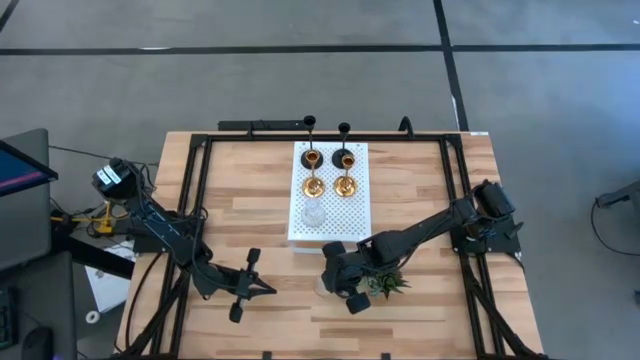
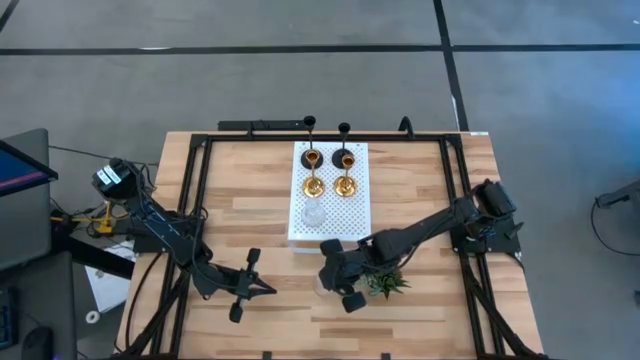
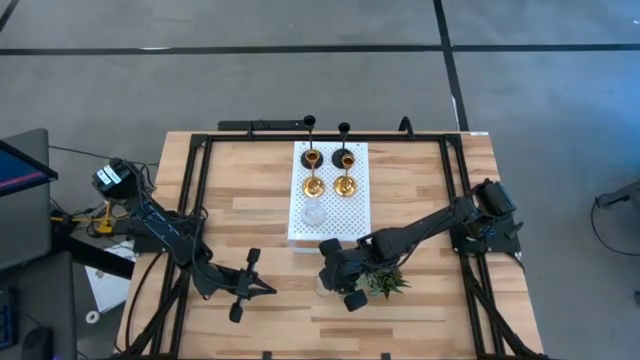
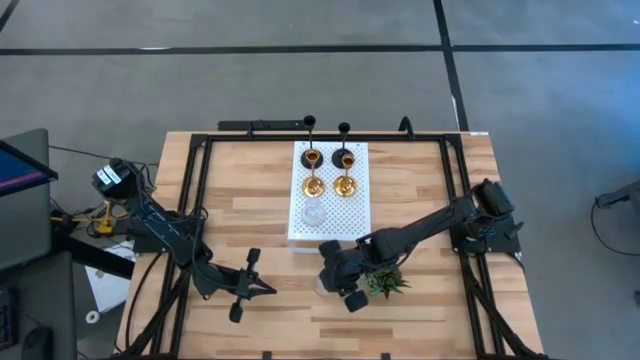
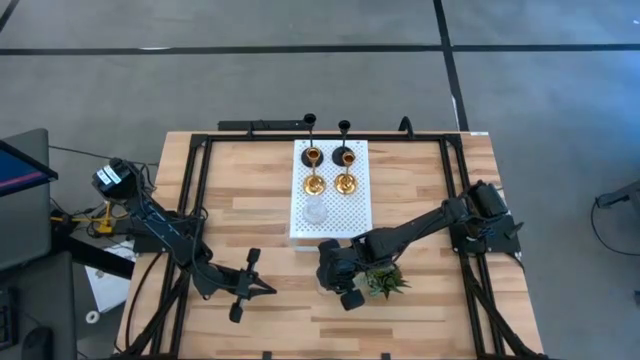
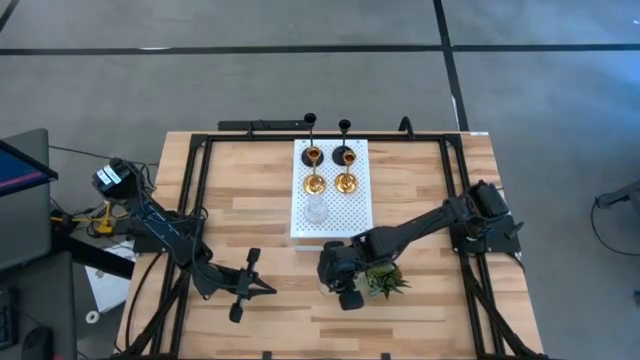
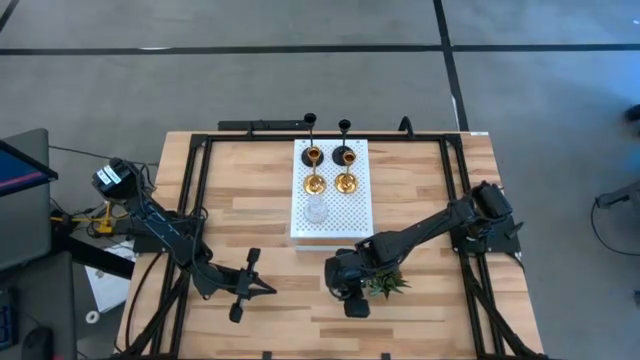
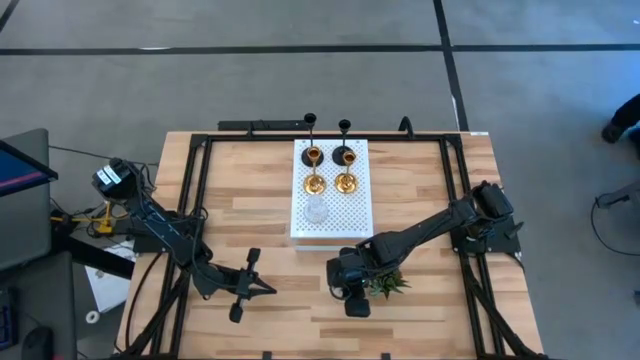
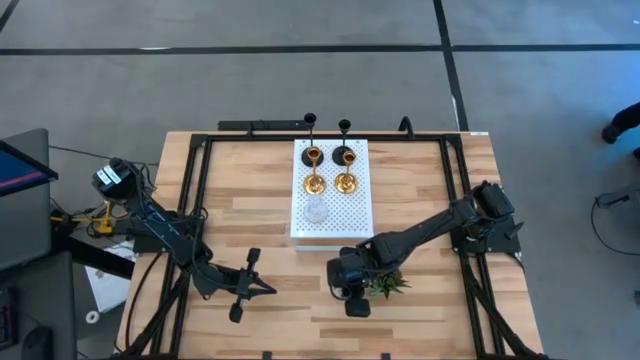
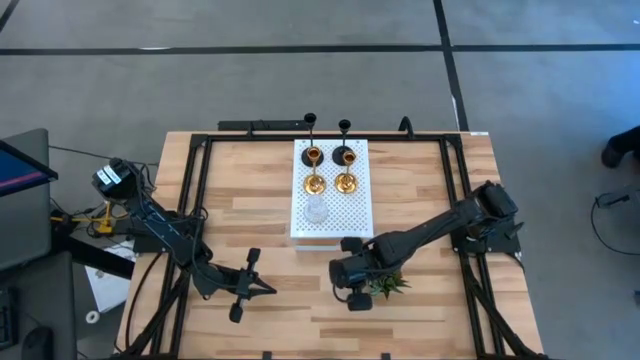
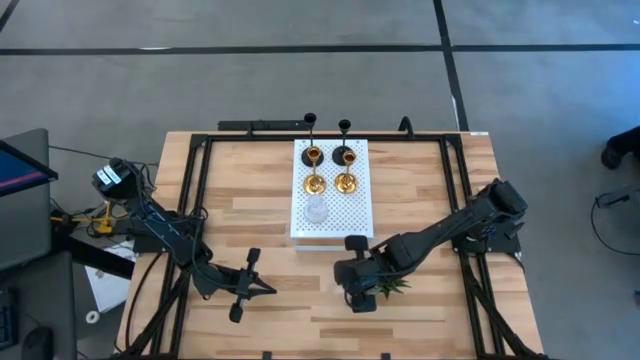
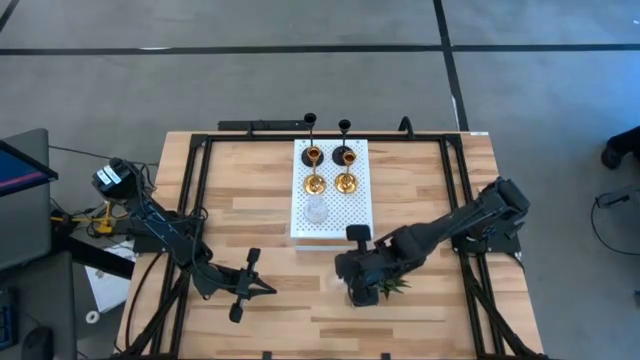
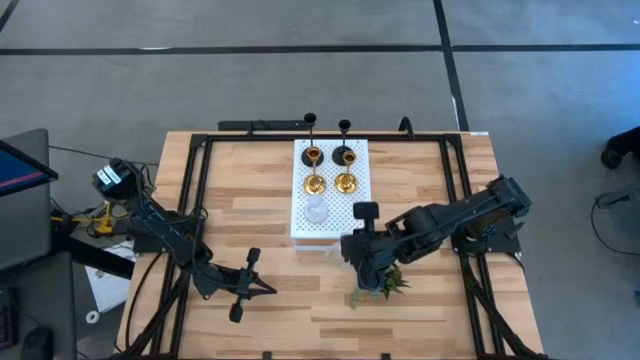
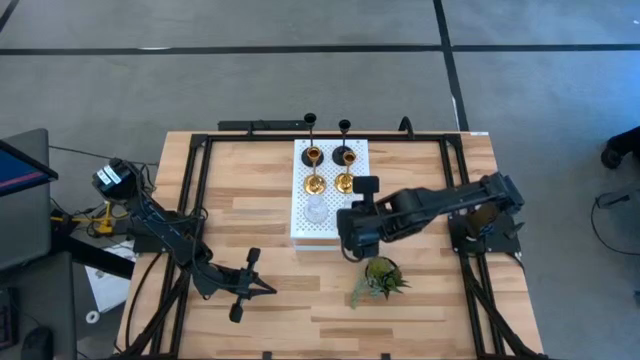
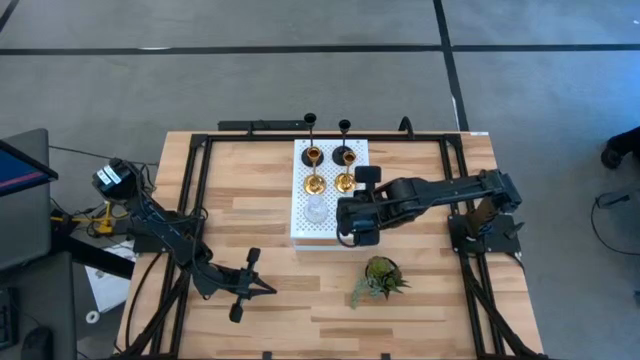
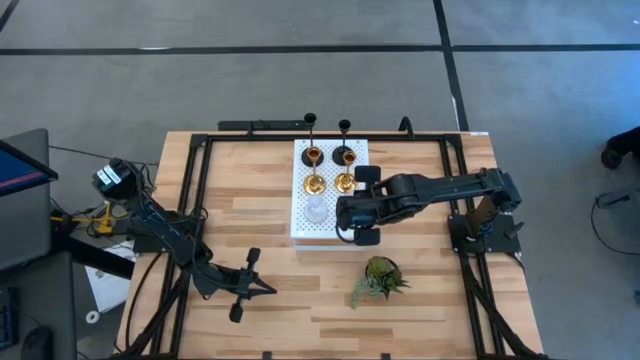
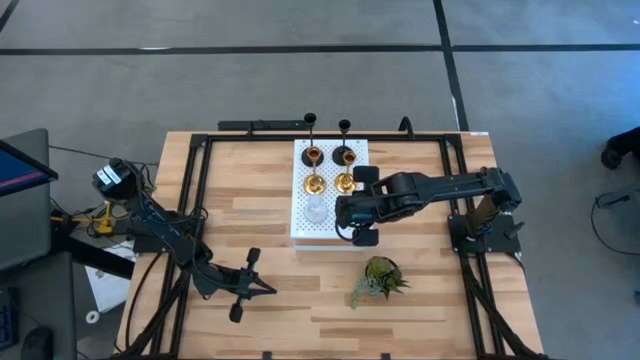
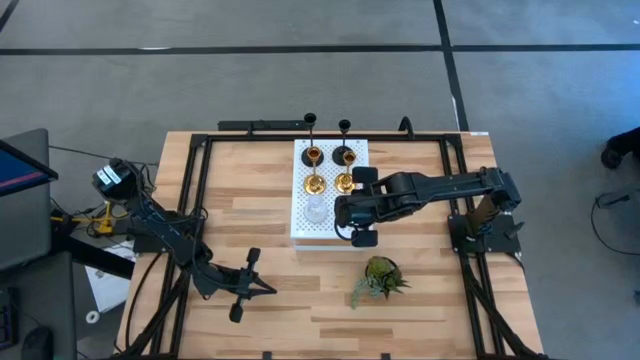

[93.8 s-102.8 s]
Task: Pick & Place candle stick holders
Put the glass candle holder on the shelf

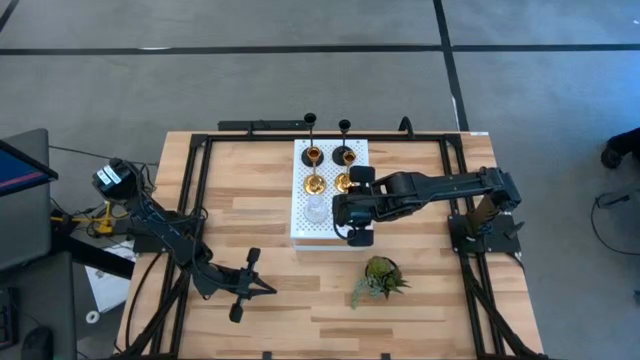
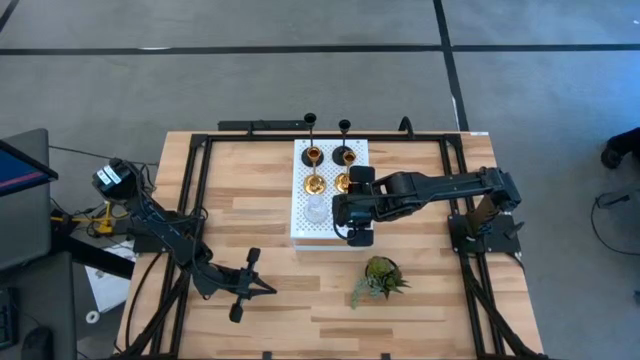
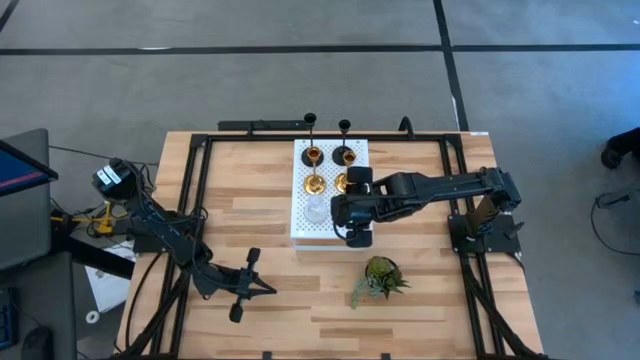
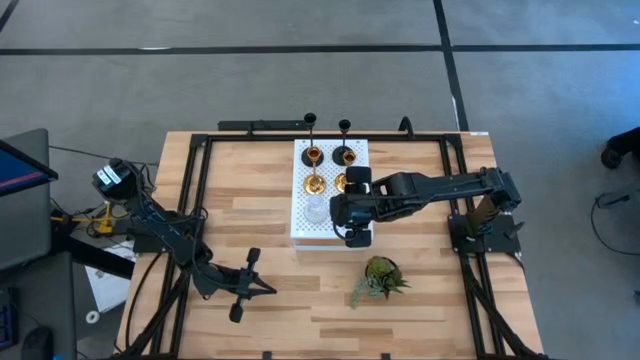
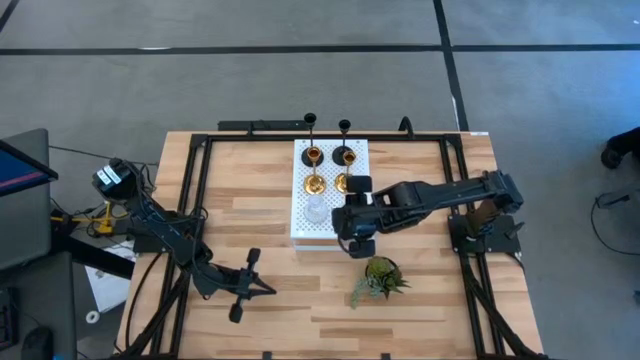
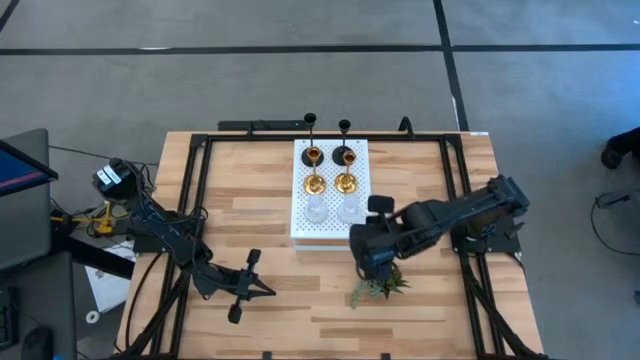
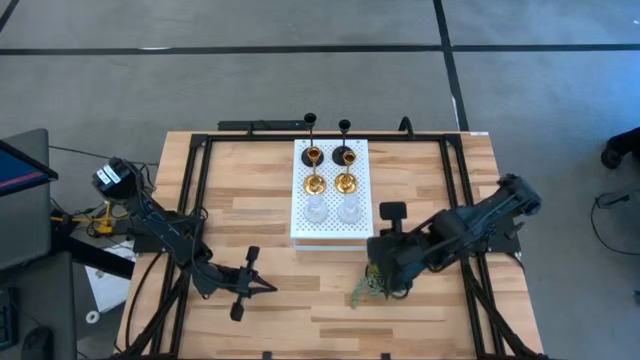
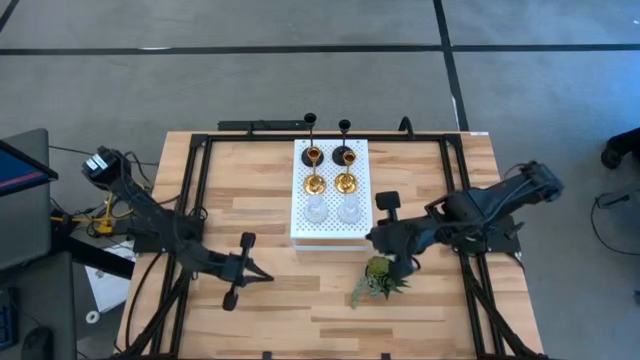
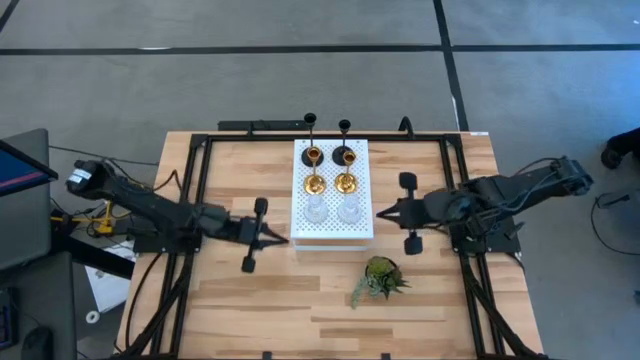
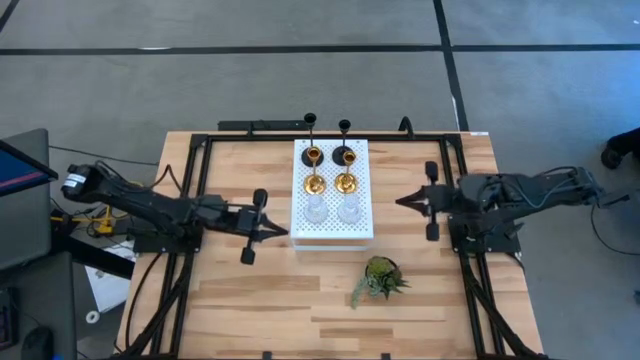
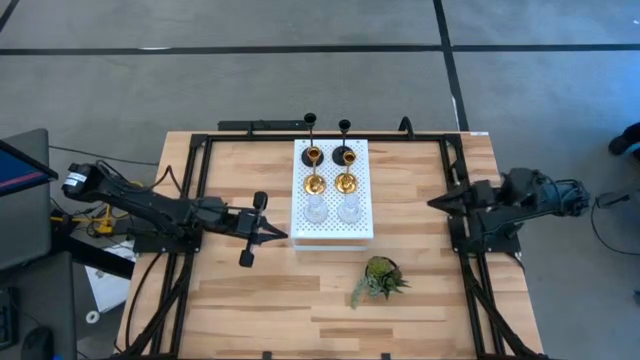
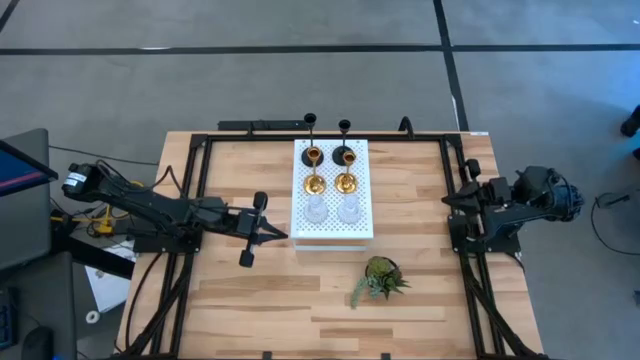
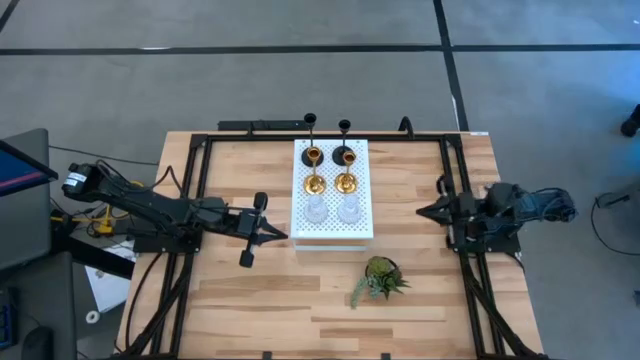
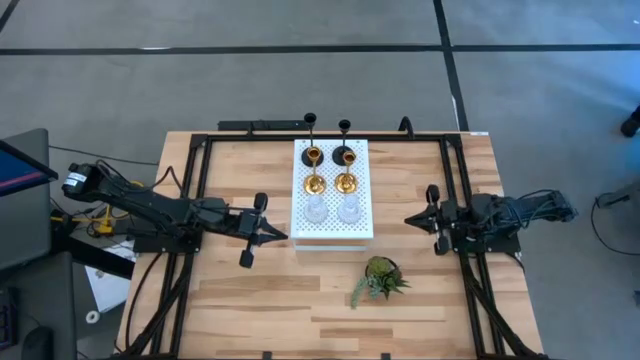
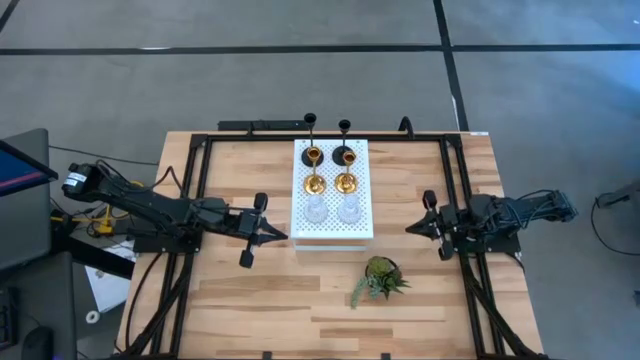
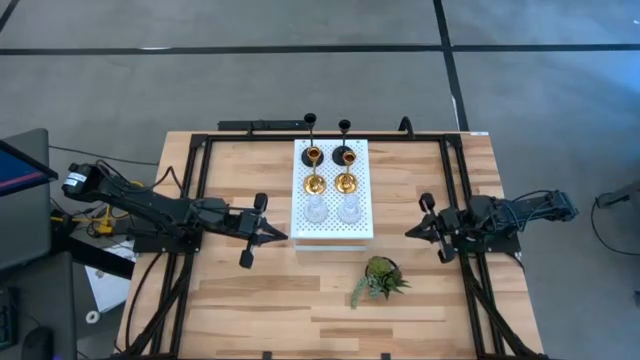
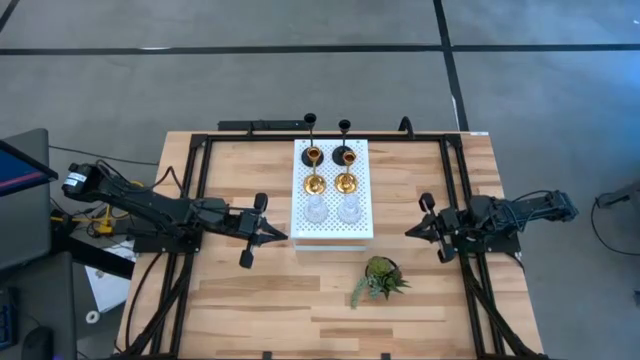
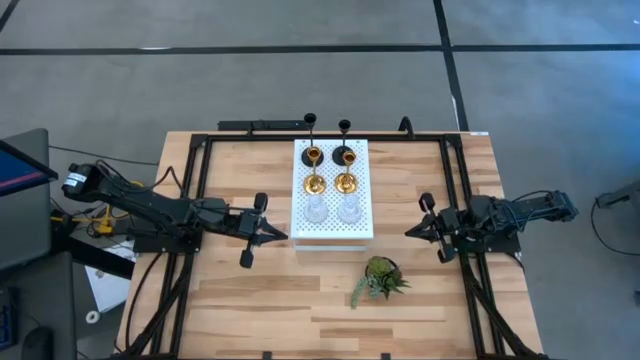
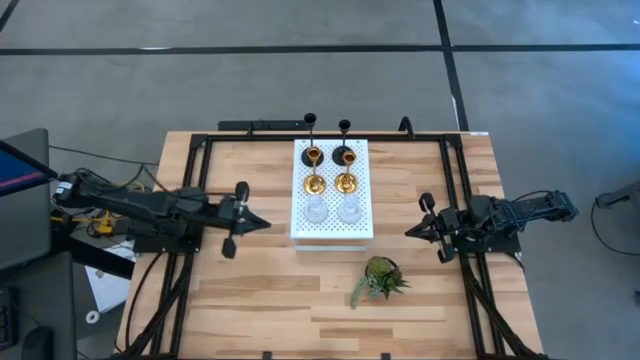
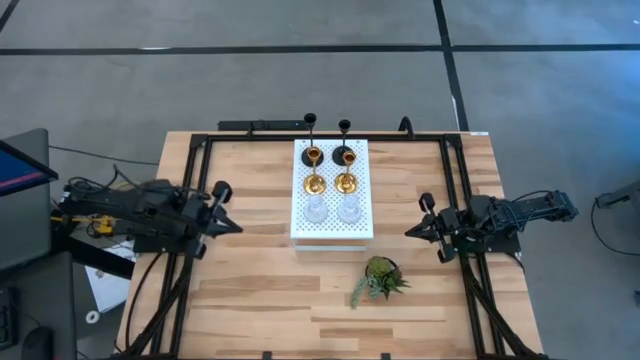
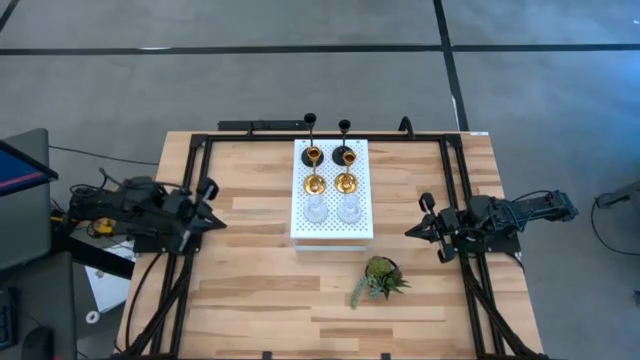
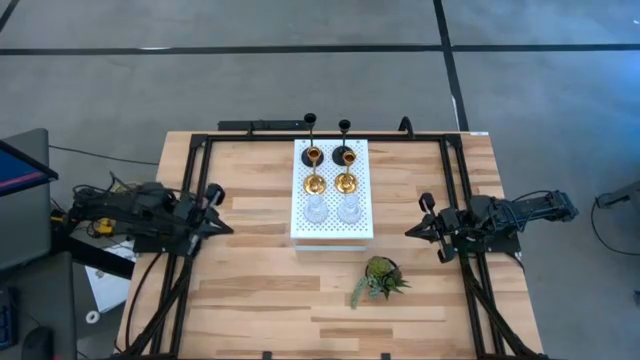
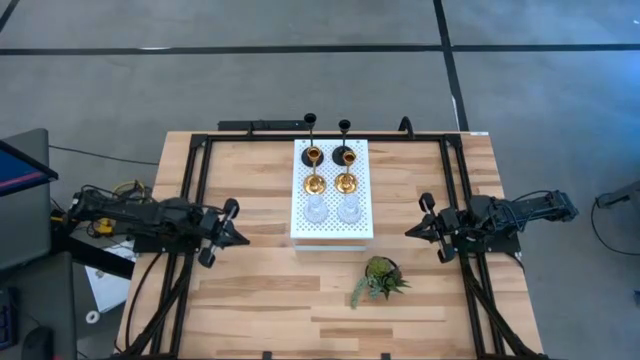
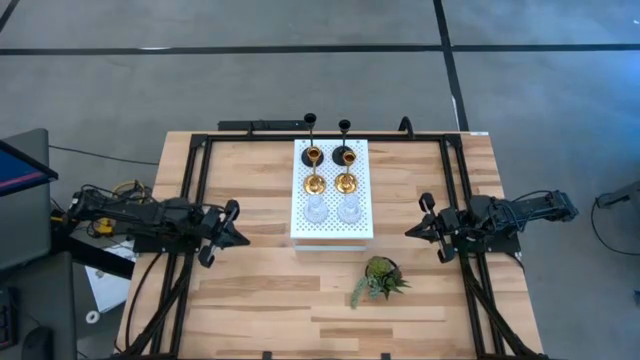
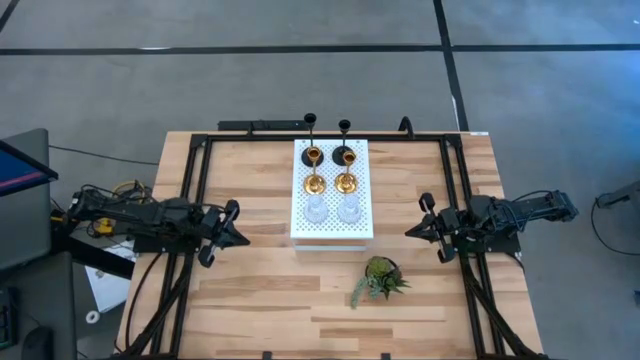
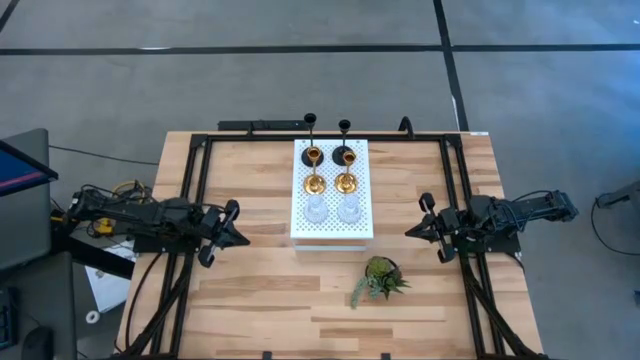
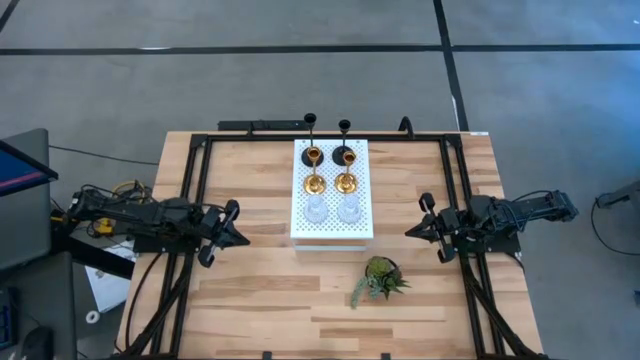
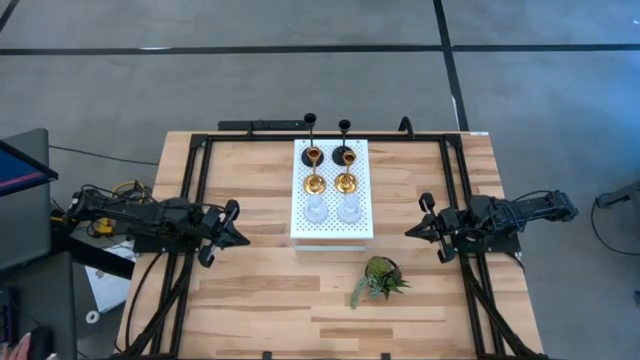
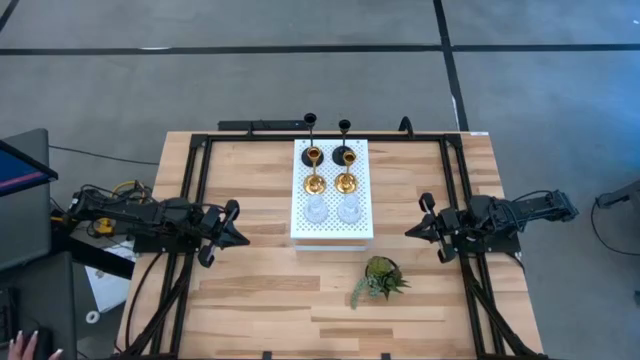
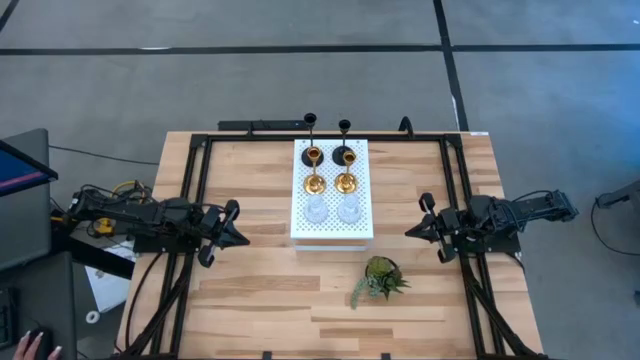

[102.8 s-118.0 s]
Return to Home Position
